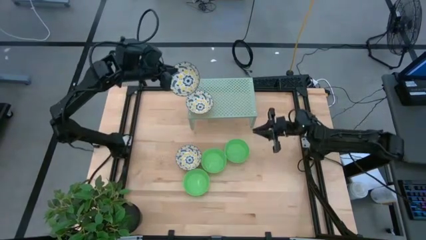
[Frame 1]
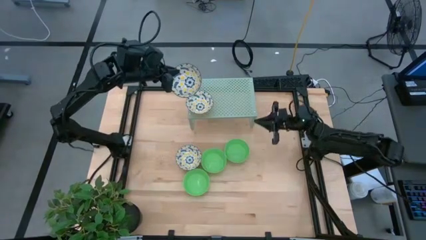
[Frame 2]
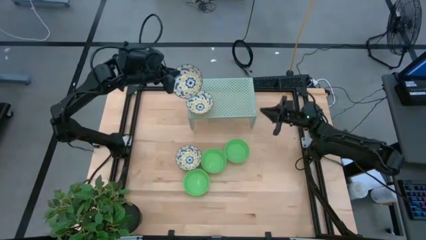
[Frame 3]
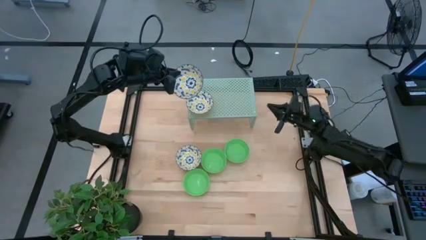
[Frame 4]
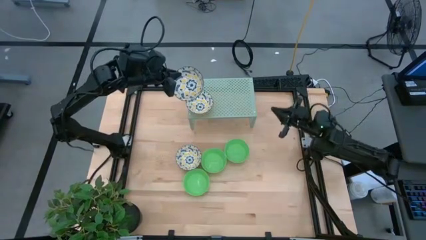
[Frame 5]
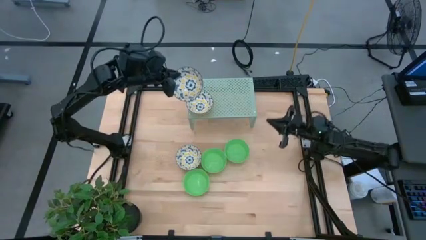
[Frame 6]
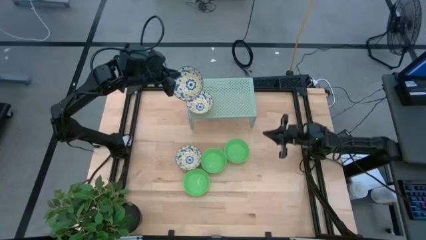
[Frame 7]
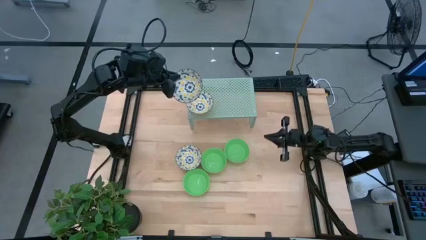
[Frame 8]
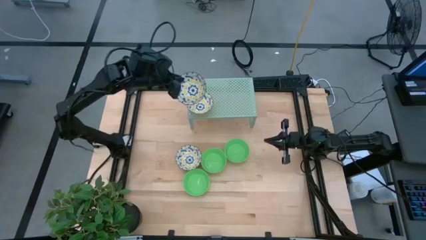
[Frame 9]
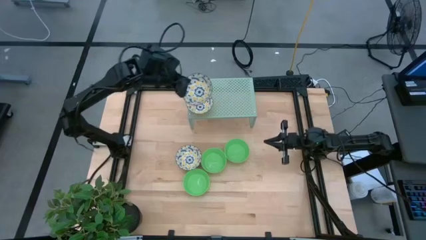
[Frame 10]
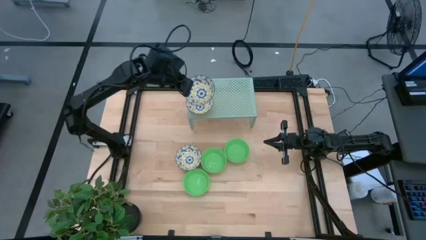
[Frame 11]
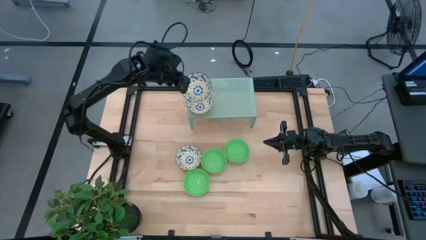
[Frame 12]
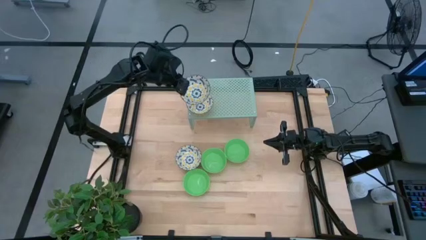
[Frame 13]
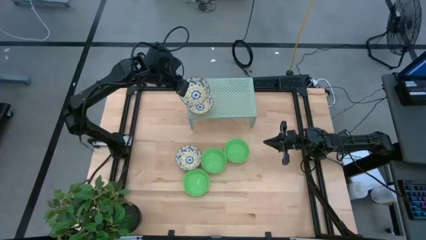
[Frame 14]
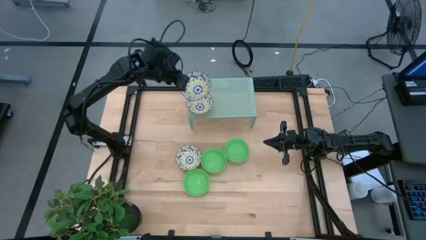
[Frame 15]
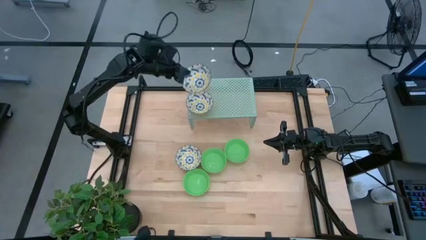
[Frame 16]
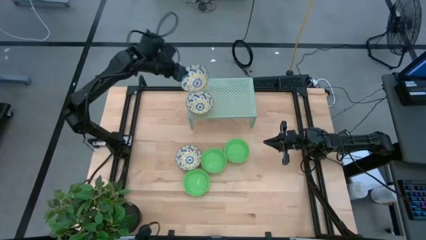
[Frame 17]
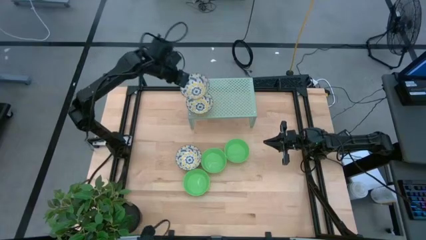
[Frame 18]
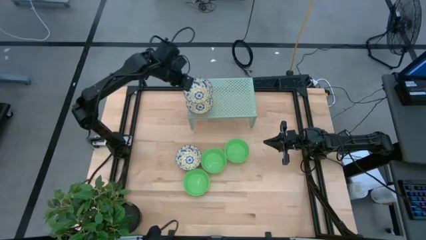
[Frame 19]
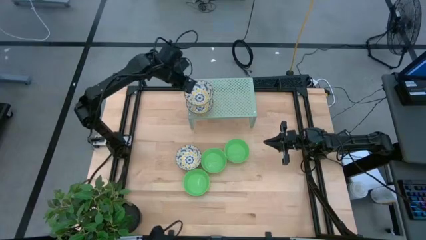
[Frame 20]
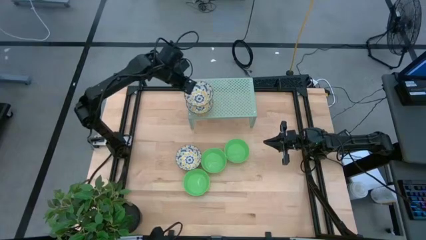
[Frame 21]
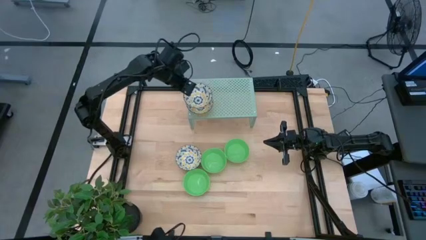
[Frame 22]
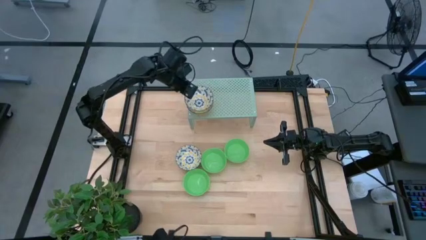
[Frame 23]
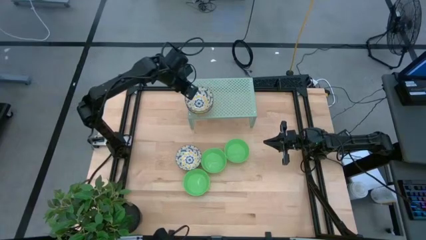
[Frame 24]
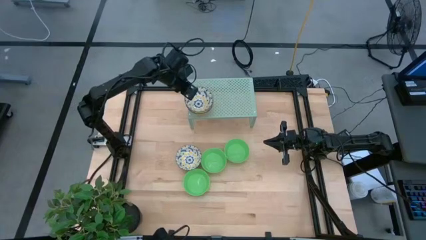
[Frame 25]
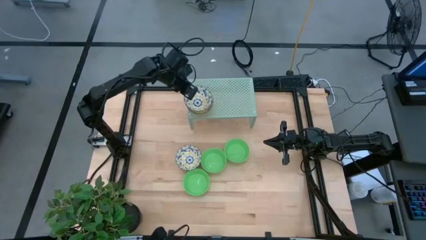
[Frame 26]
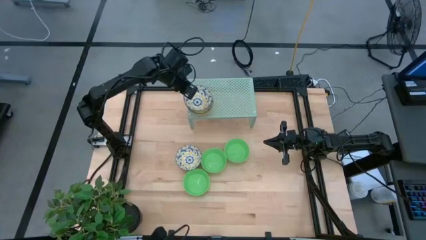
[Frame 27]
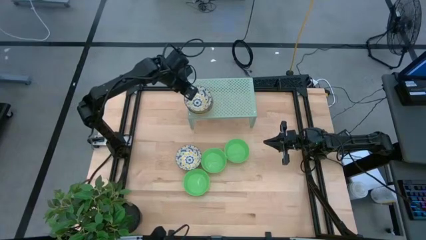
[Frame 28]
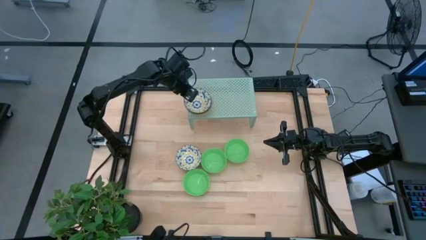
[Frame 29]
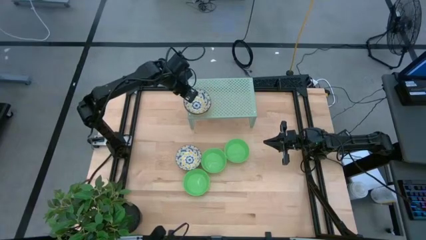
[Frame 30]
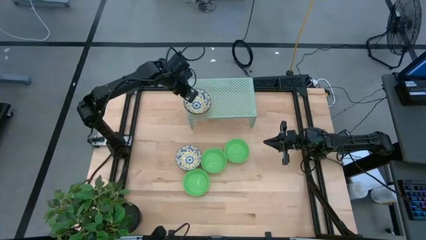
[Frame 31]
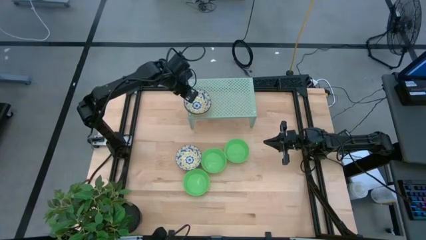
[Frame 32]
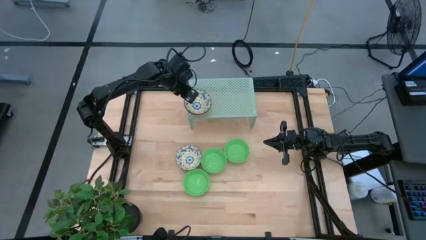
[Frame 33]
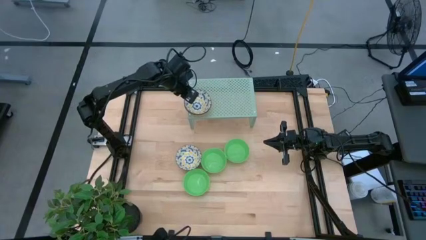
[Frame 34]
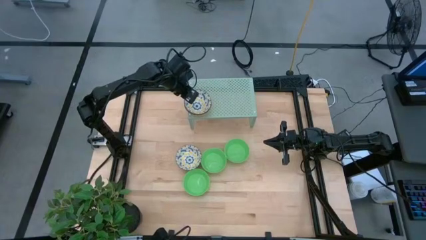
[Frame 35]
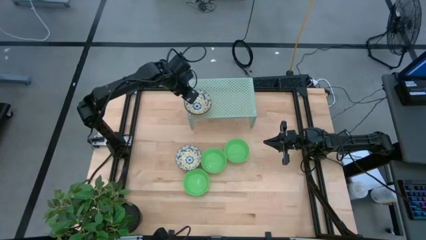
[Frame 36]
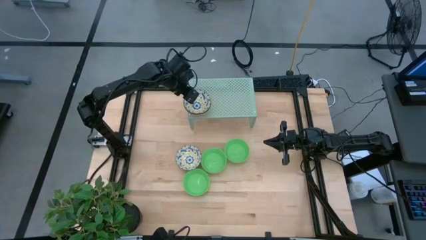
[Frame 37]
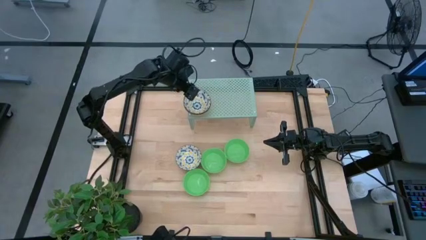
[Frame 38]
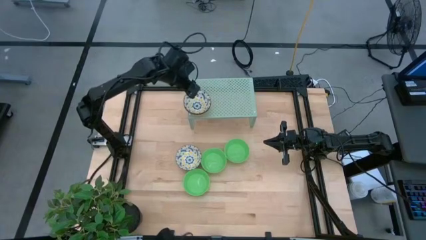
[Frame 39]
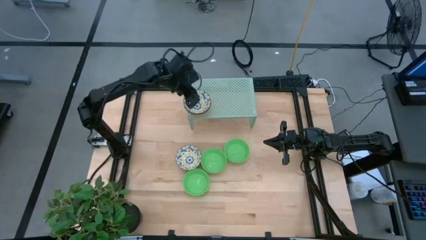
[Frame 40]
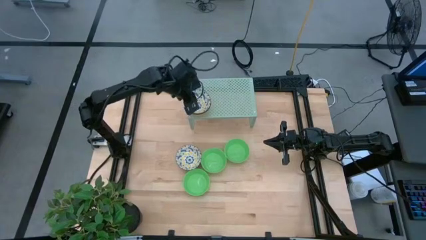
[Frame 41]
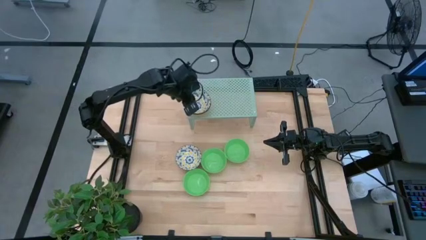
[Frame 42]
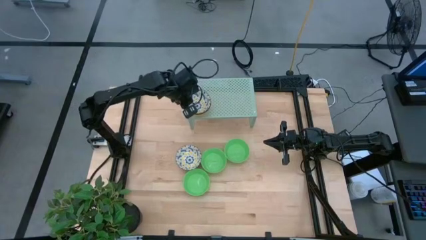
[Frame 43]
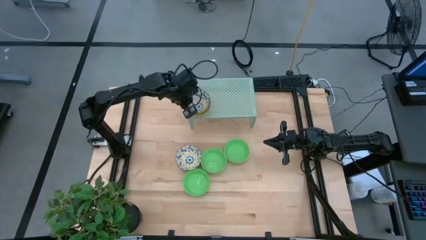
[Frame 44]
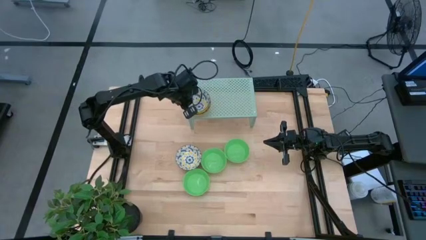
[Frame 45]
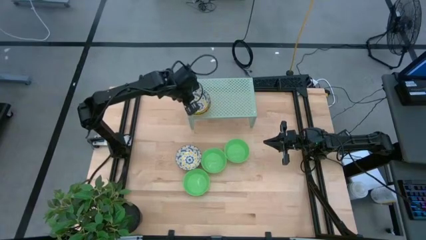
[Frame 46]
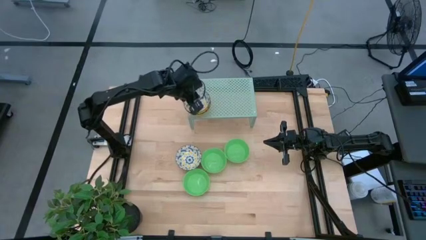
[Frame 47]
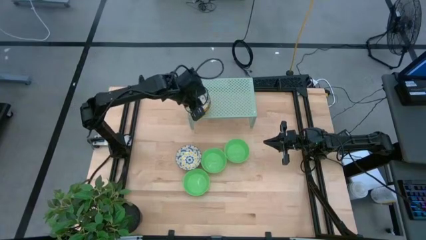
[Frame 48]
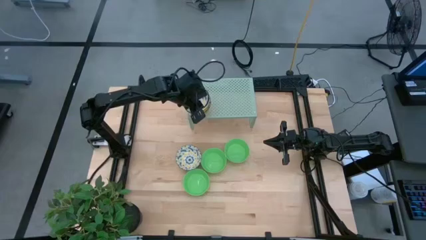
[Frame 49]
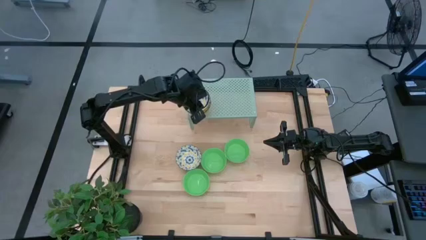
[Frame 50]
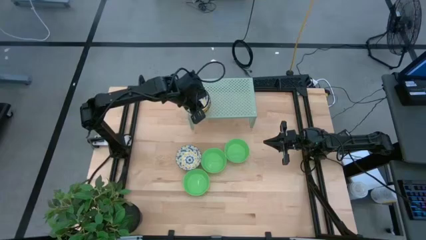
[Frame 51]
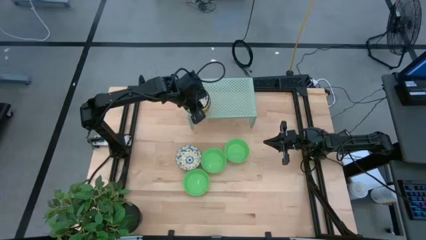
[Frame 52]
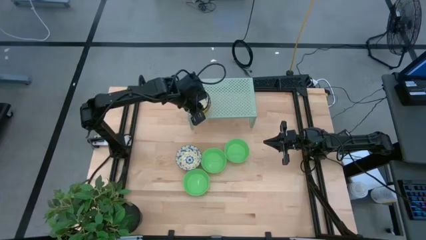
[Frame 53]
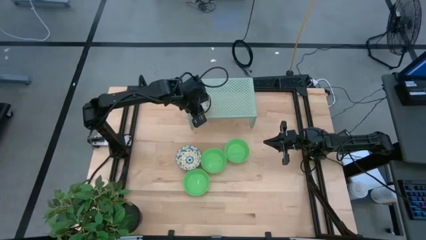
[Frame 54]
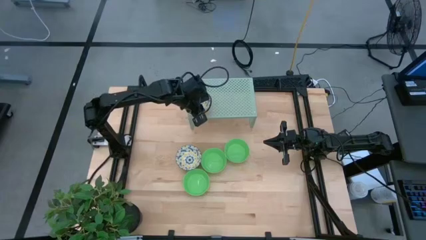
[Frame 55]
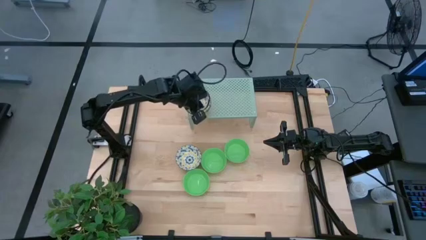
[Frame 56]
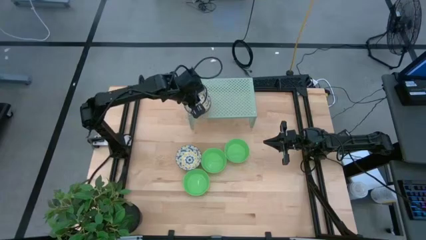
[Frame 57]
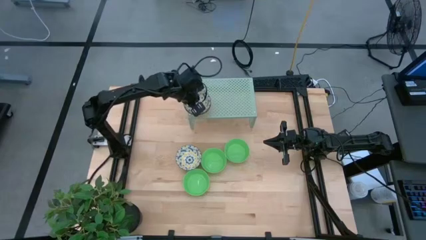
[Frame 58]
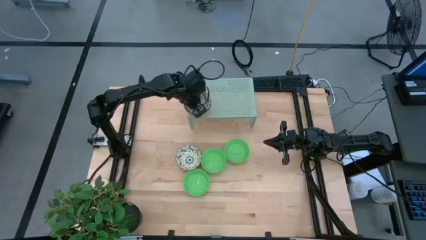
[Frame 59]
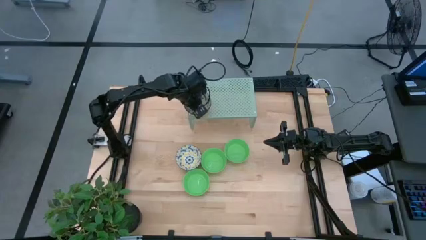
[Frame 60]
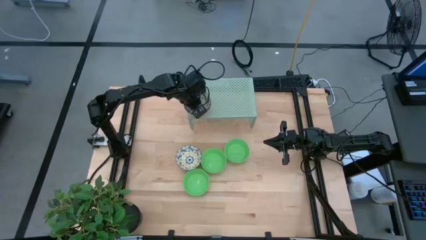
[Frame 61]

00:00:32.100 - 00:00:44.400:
Task: Pick & Place Mini bowls
Stack the bottom white patterned bowl on top of the white patterned bowl on the shelf

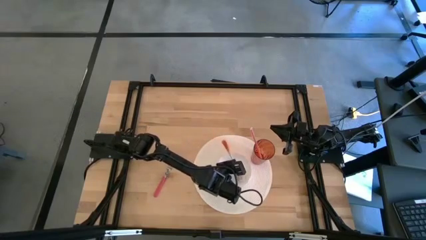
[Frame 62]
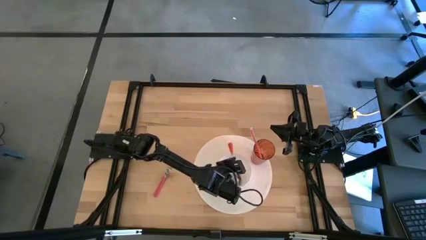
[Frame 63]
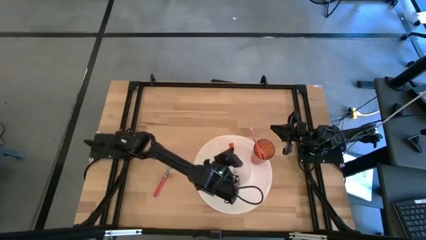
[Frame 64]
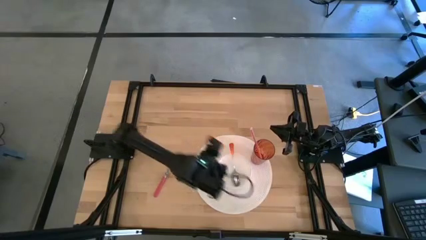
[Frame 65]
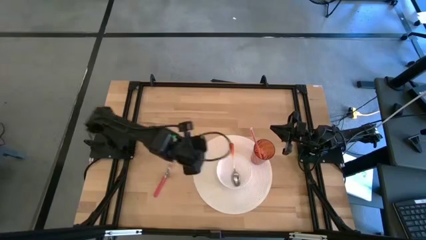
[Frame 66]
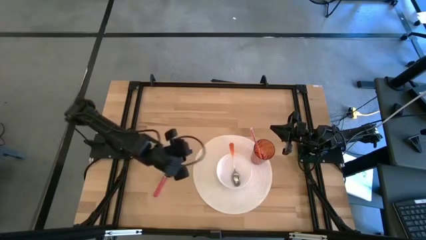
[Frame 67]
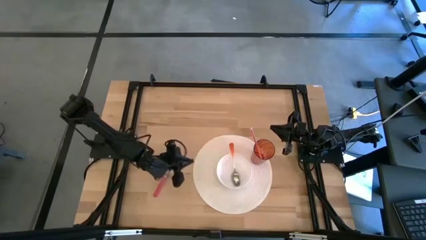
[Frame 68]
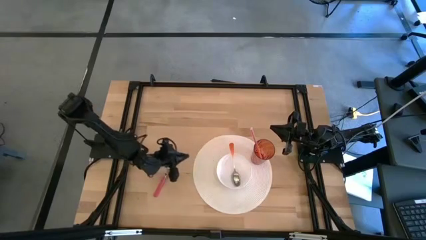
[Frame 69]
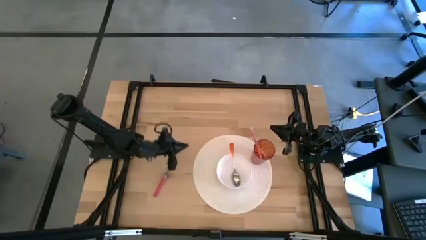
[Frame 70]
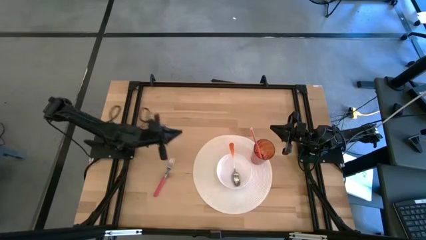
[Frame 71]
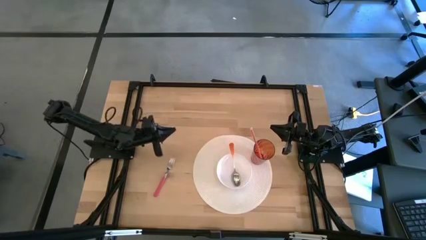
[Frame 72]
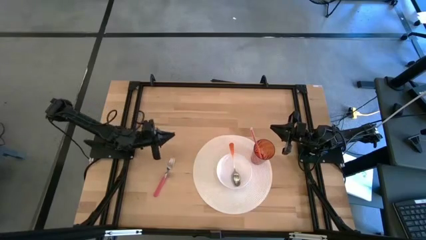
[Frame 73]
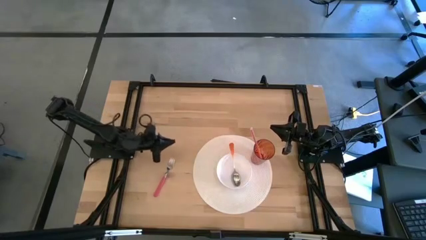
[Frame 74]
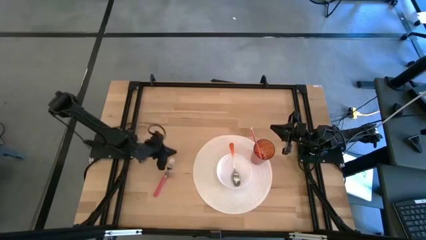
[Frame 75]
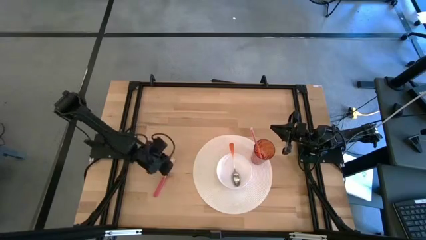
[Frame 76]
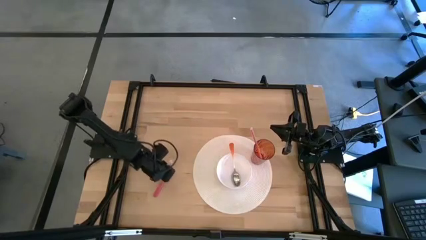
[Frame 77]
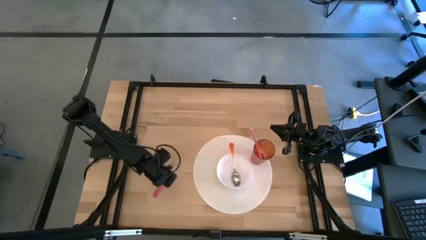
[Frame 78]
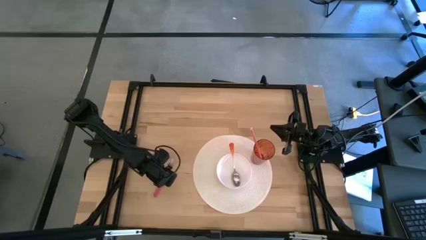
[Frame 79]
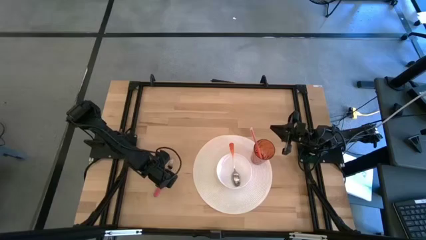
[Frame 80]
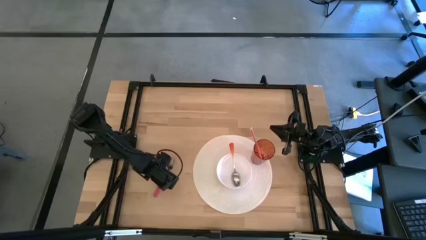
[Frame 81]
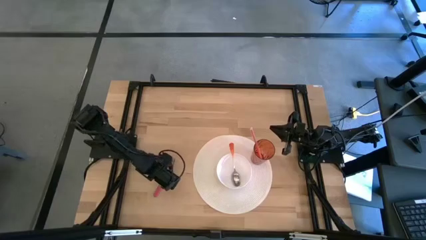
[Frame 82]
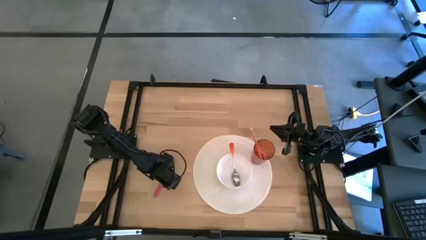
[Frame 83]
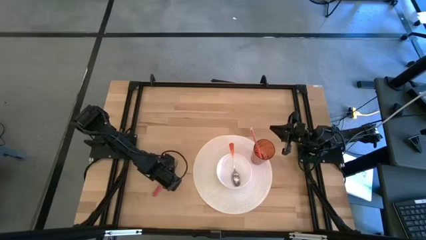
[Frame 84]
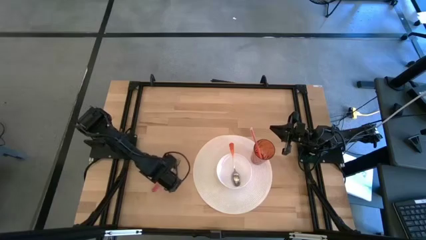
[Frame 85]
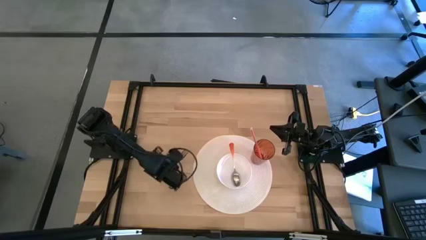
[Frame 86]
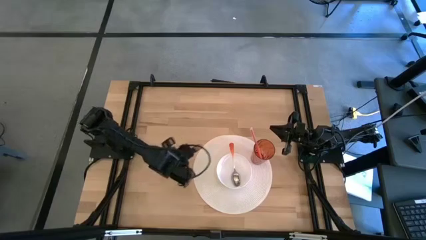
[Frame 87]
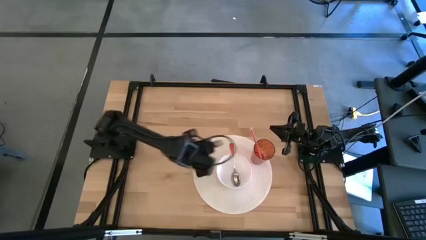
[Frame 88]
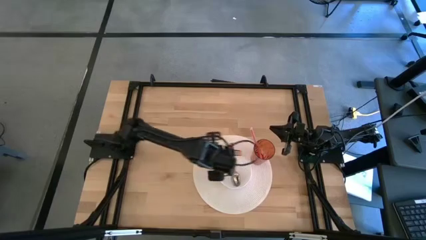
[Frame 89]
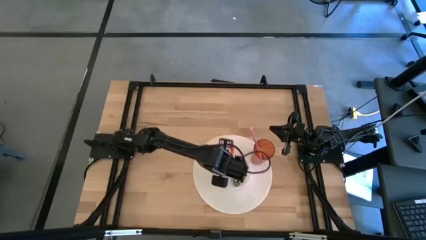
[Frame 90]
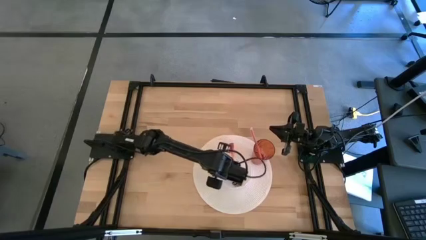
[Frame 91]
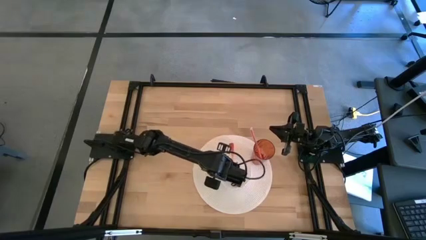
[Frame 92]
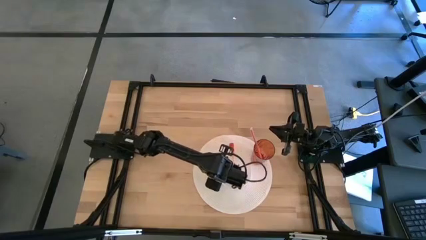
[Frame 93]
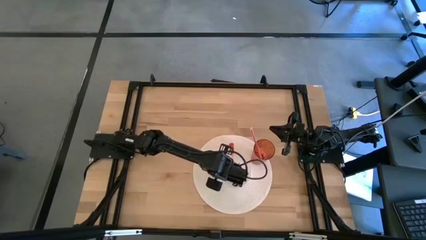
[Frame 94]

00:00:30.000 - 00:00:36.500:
Task: Pick & Place Utensil
Put the red fork into the white bowl on the white mat
